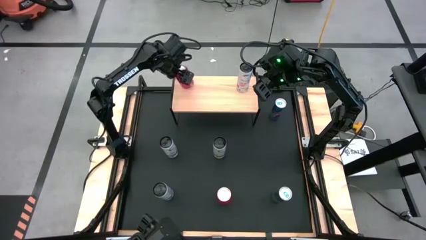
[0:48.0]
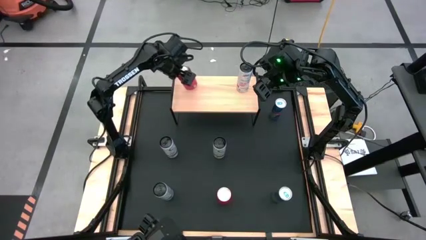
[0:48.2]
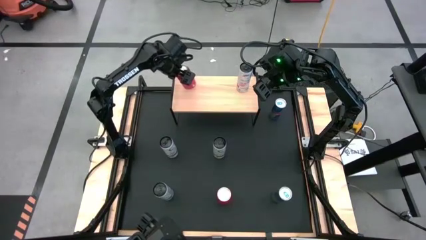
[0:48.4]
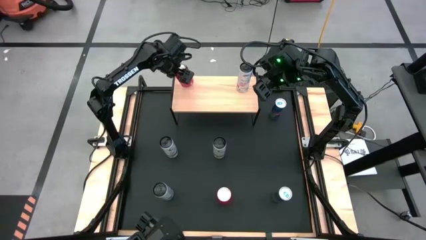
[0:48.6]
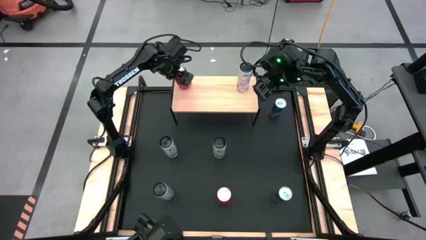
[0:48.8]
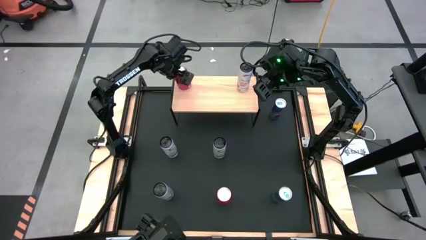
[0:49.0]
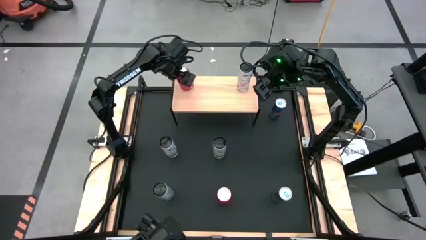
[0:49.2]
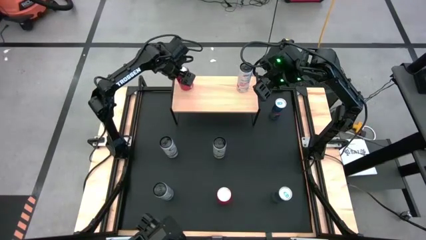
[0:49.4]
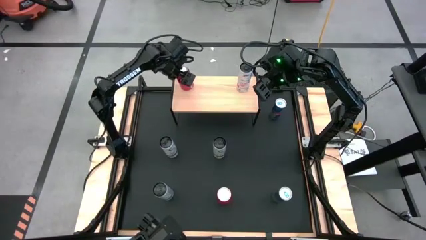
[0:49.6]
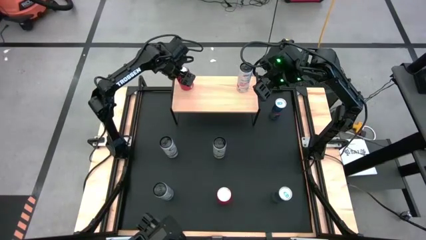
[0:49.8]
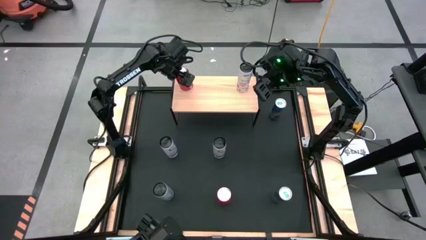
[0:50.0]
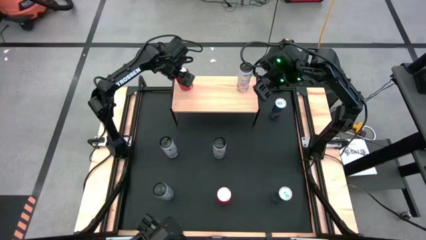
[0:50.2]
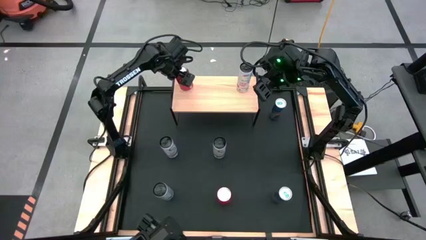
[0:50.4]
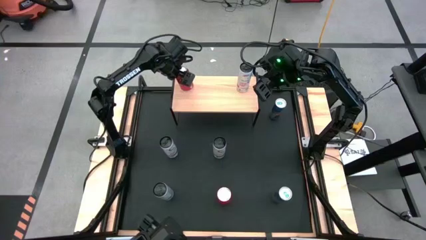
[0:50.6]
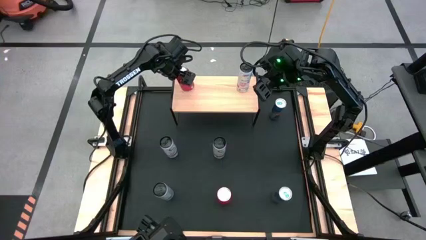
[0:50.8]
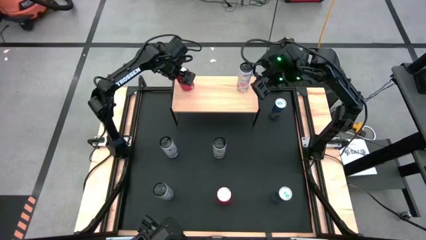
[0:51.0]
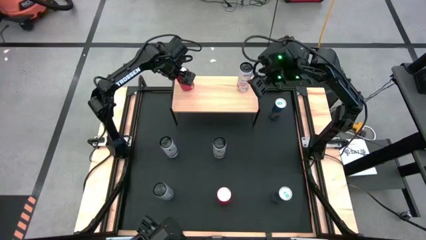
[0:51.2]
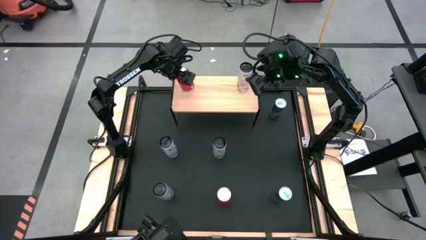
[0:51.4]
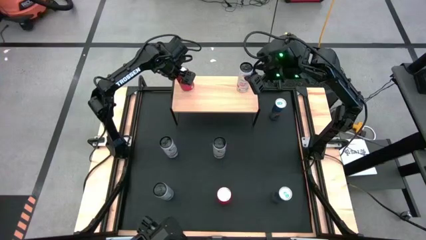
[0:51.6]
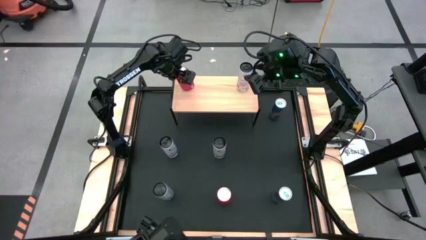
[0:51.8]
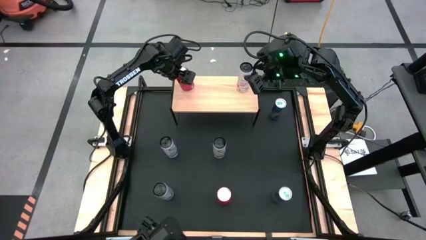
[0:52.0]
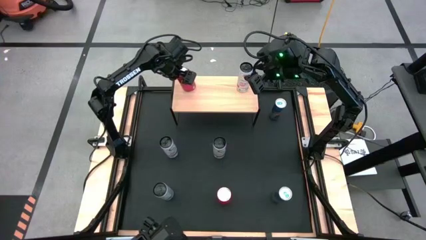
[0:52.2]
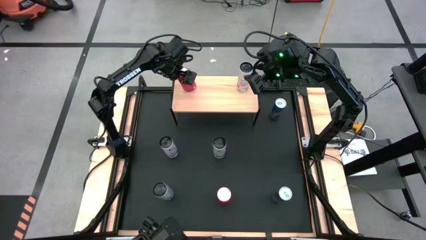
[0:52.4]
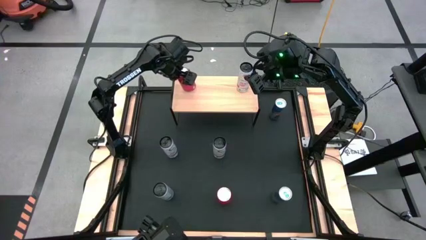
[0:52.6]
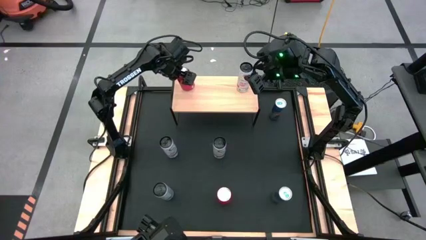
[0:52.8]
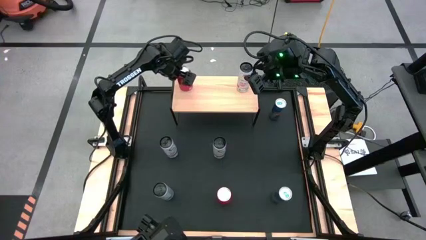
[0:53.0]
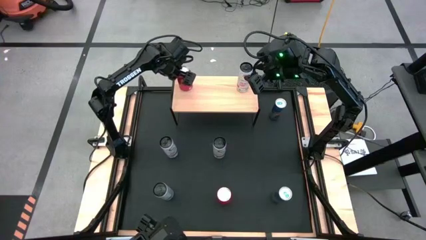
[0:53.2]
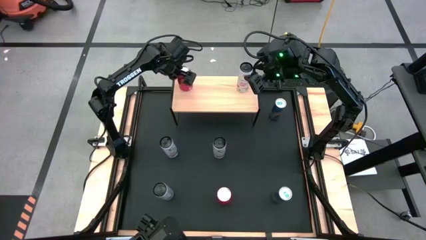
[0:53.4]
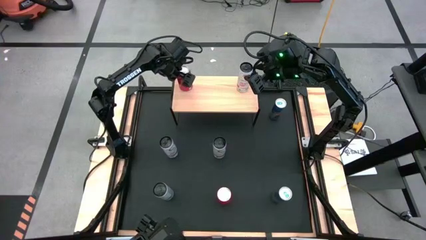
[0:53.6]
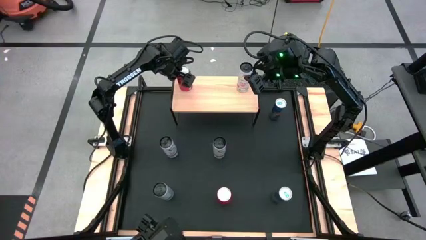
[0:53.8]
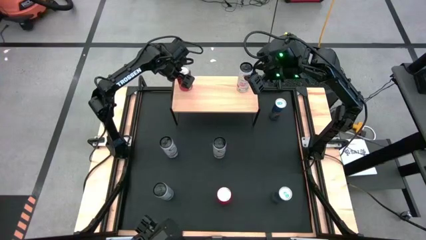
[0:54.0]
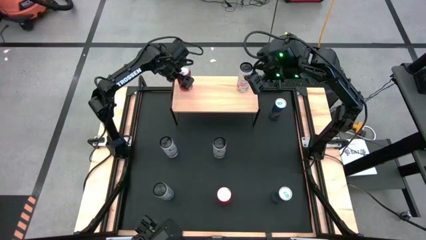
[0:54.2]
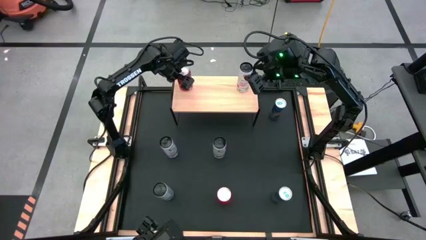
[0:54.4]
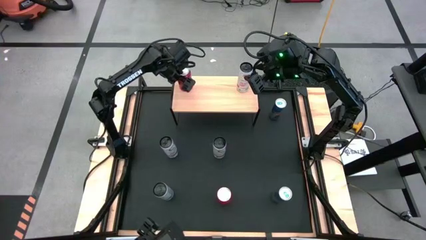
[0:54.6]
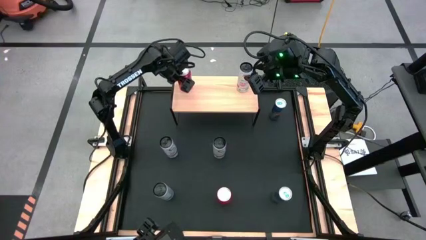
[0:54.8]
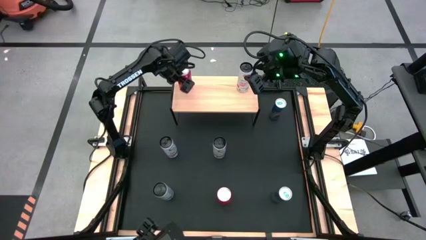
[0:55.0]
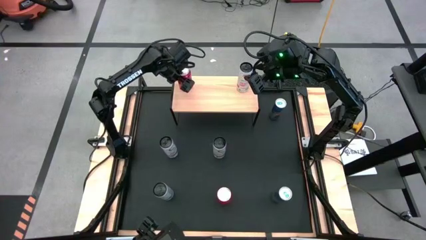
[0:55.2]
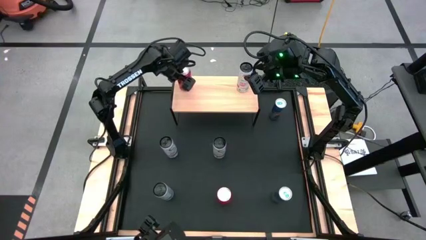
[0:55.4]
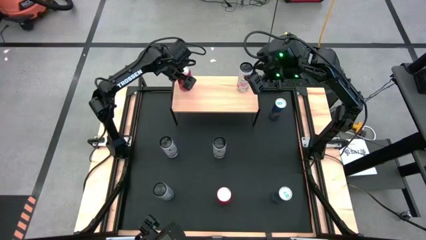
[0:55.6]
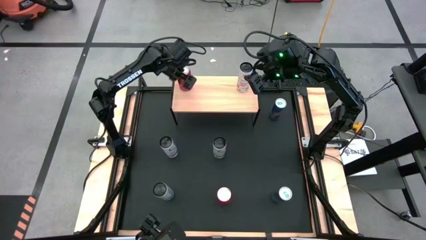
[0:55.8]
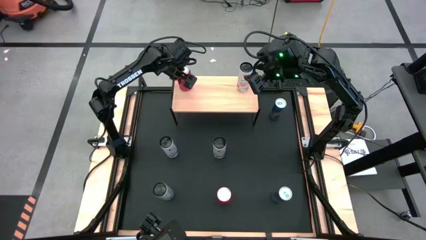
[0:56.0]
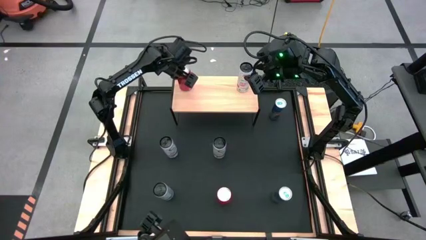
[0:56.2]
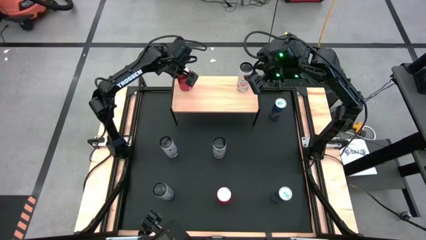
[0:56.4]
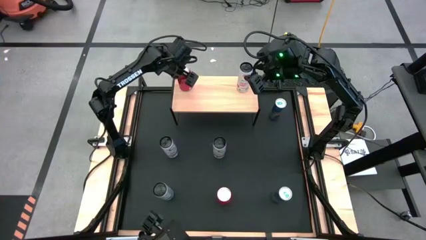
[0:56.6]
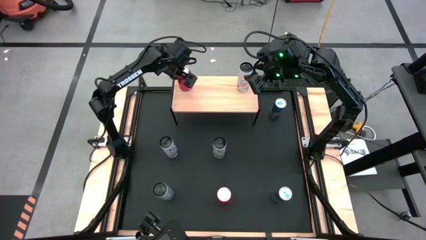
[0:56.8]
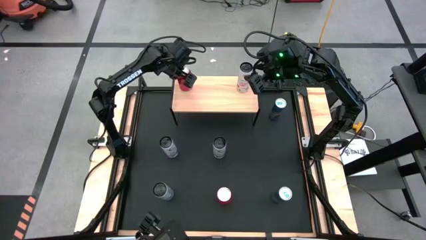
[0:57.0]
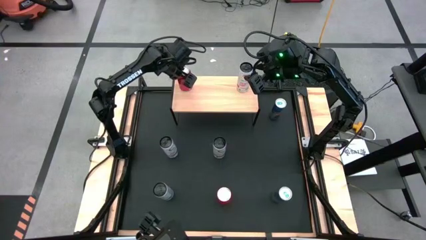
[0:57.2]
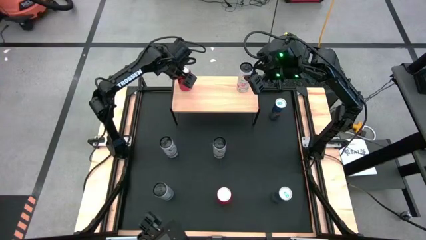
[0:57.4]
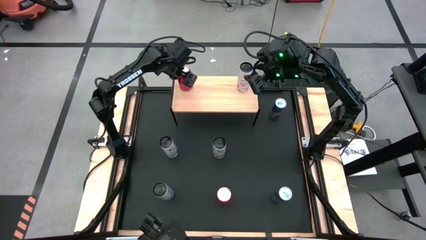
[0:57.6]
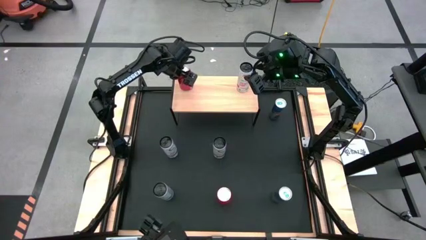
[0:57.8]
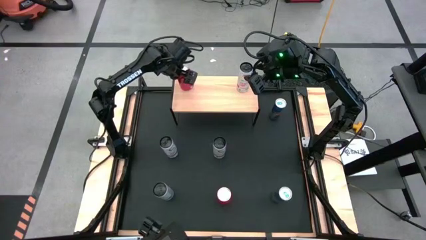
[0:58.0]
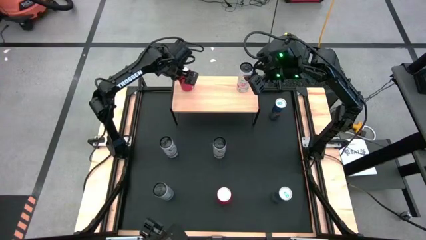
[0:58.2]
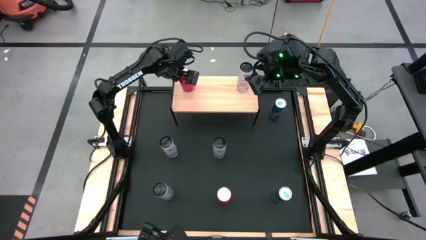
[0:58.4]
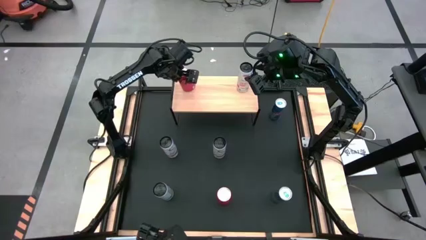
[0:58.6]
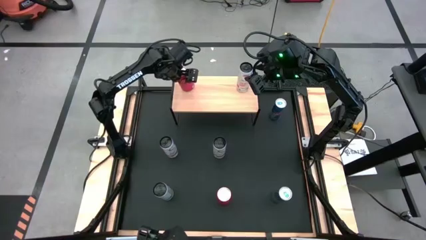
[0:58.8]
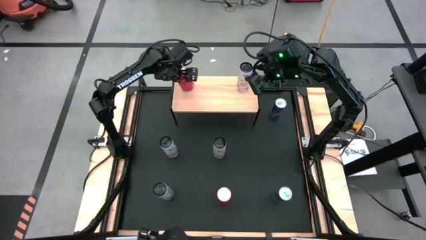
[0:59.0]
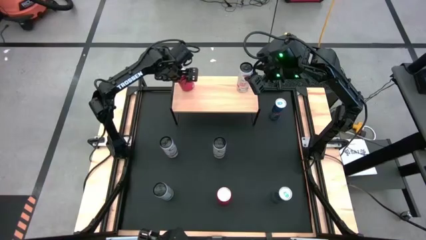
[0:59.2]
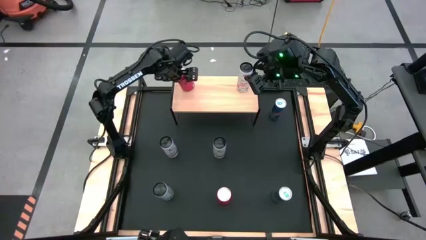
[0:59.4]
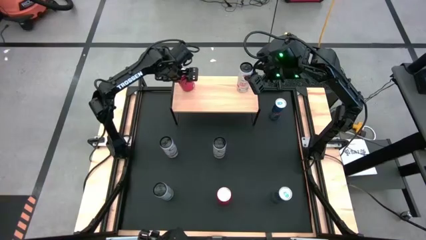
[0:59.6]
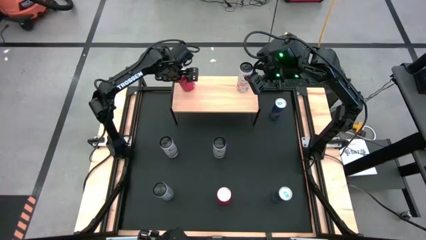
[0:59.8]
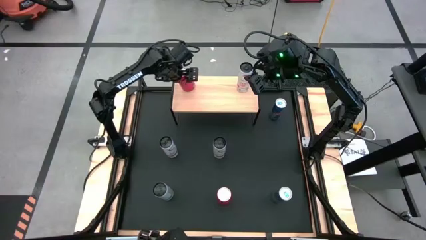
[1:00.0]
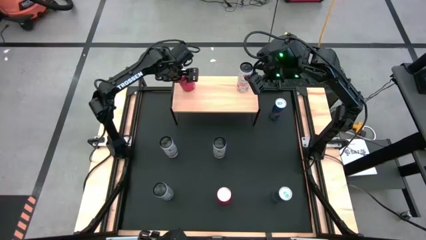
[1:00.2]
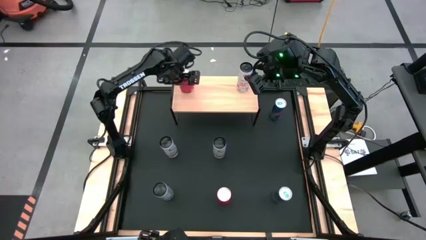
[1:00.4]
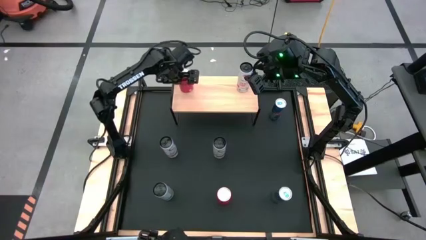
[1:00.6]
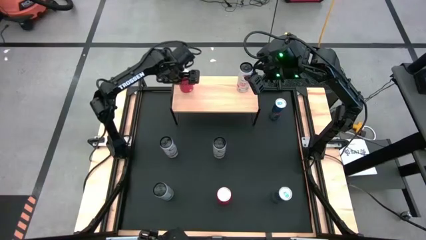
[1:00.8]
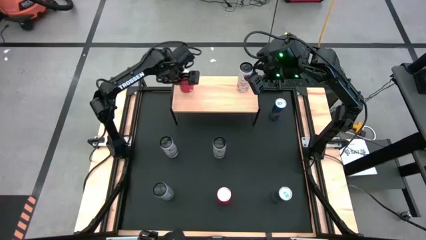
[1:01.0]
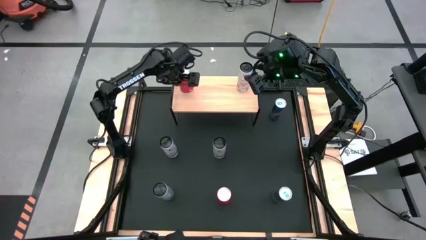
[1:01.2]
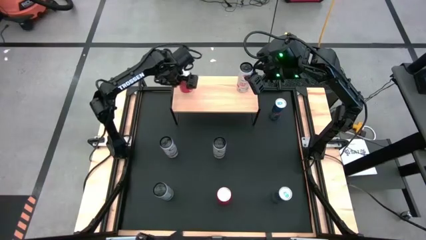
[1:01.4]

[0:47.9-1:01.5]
Task: Place canned beverage on shelf
Put the top red soda can on the shelf

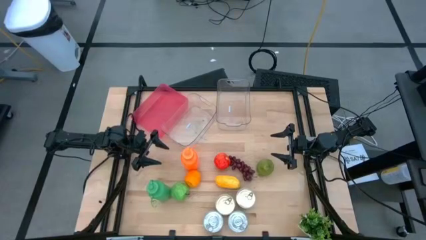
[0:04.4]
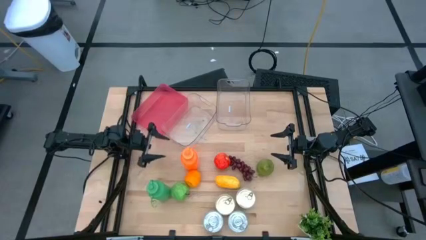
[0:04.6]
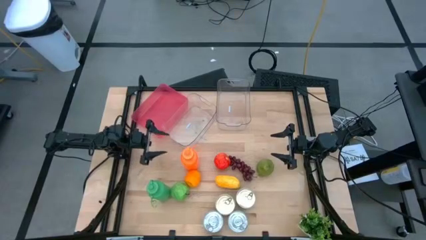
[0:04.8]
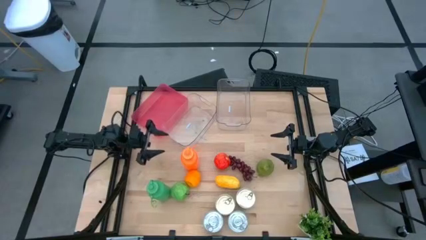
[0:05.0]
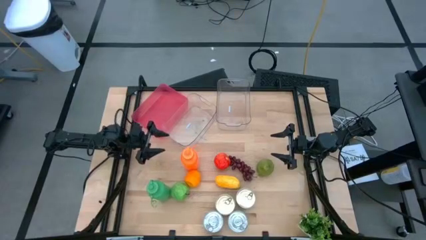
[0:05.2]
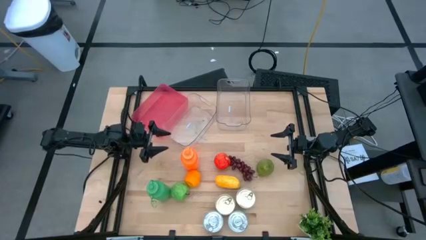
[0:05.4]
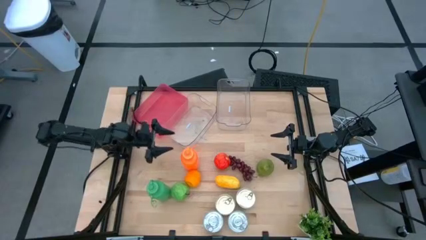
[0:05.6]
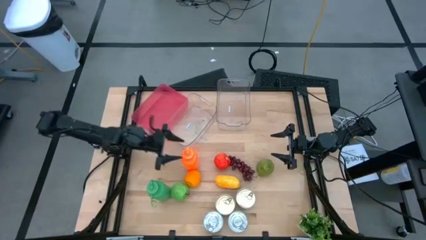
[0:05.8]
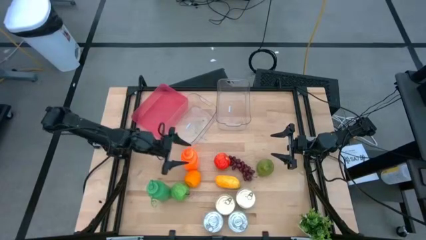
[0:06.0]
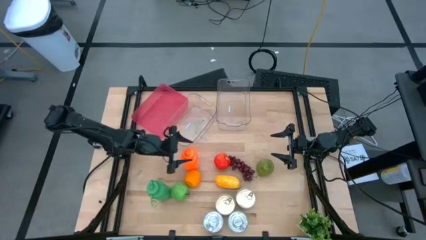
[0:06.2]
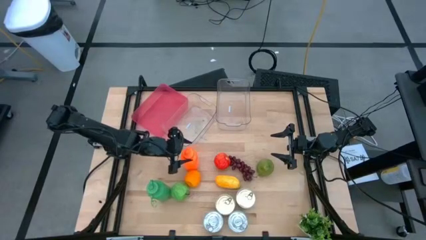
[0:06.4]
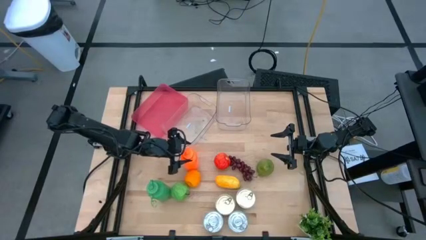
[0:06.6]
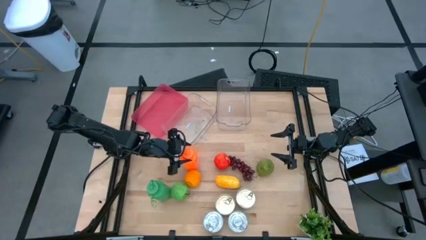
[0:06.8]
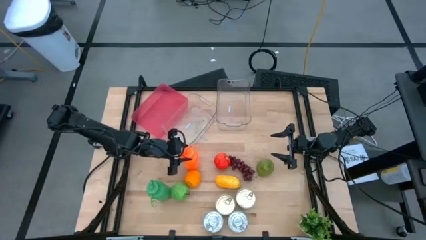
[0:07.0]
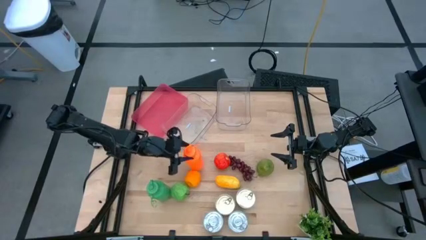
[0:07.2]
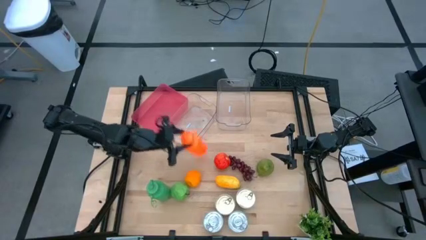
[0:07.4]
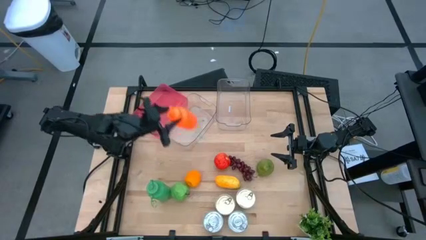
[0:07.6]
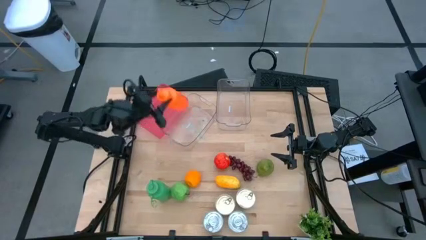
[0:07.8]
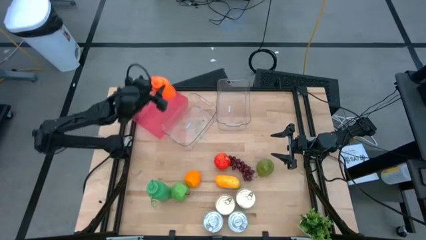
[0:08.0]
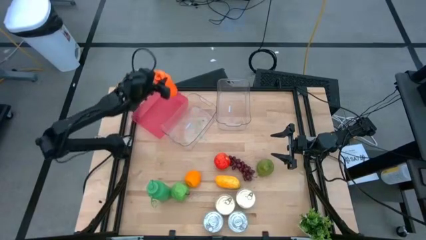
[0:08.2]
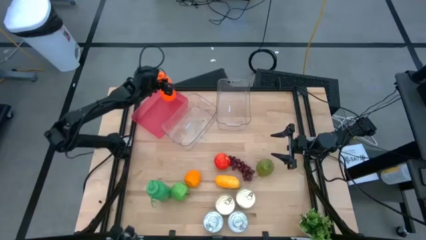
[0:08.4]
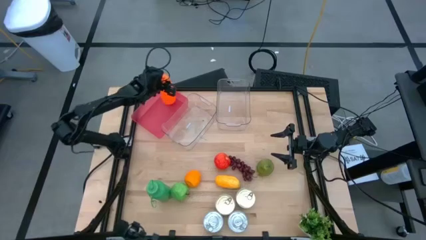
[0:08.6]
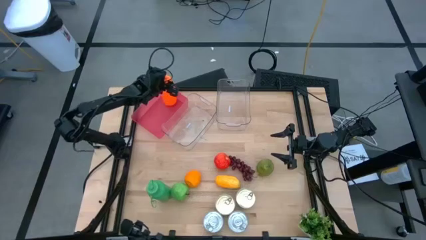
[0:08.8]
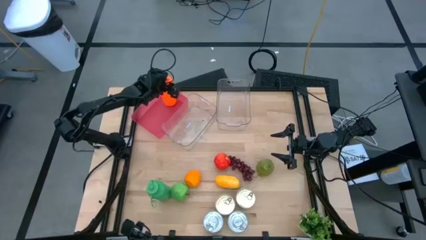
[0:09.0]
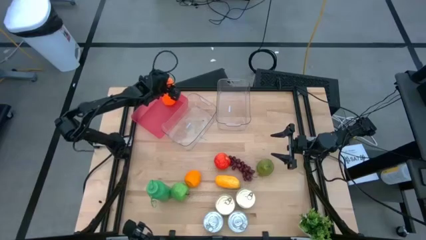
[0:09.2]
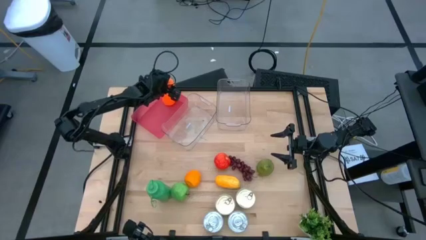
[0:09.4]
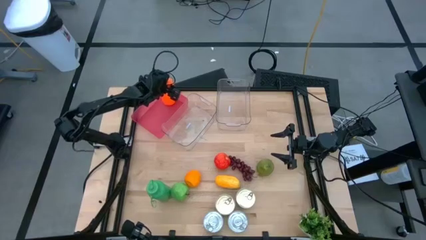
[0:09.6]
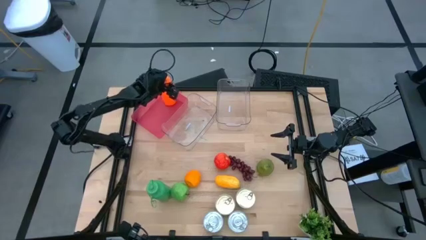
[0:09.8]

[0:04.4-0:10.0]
Task: Pick & Place Food Item
Put the orange water bottle into the pink bin
